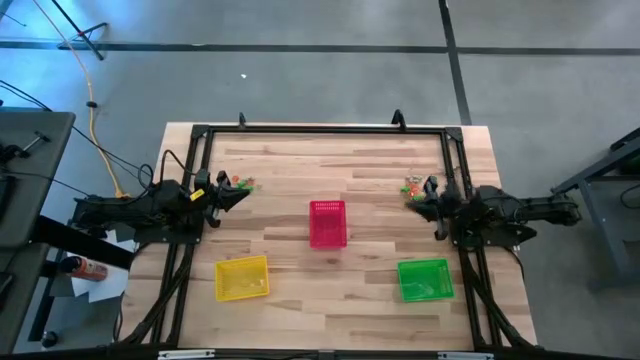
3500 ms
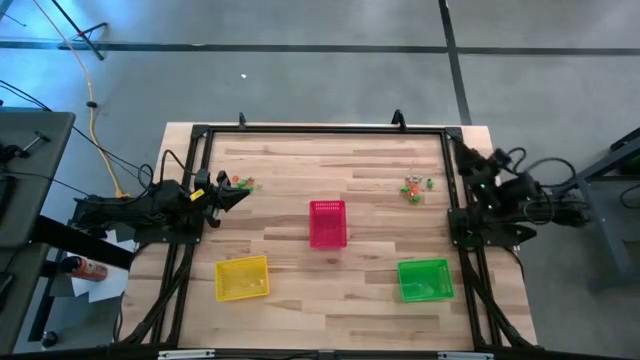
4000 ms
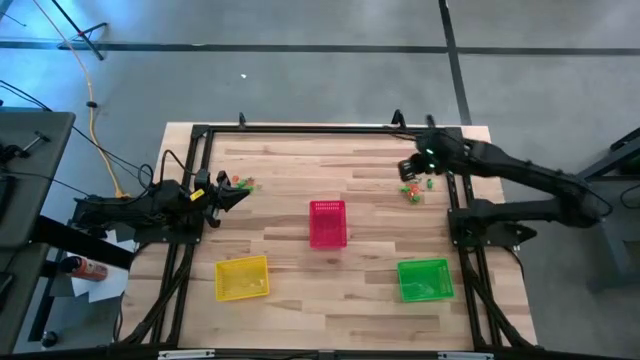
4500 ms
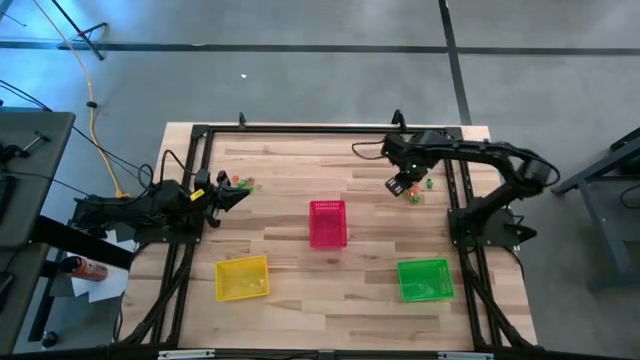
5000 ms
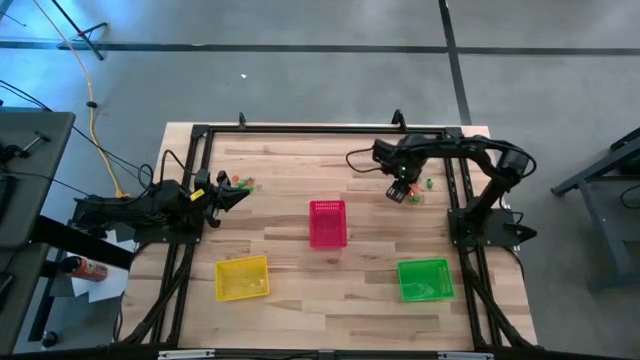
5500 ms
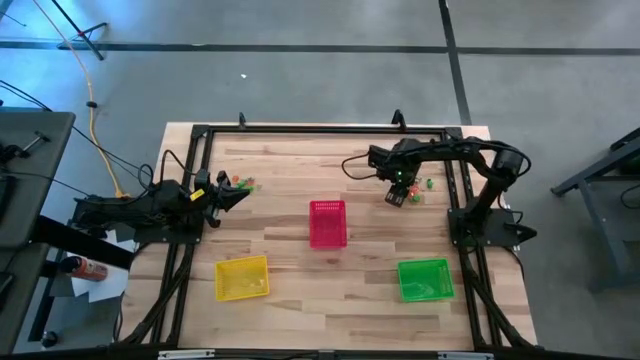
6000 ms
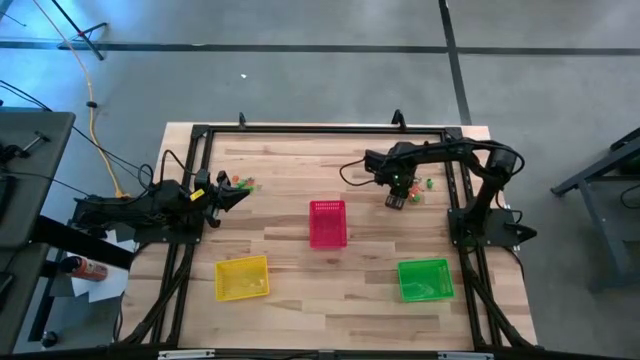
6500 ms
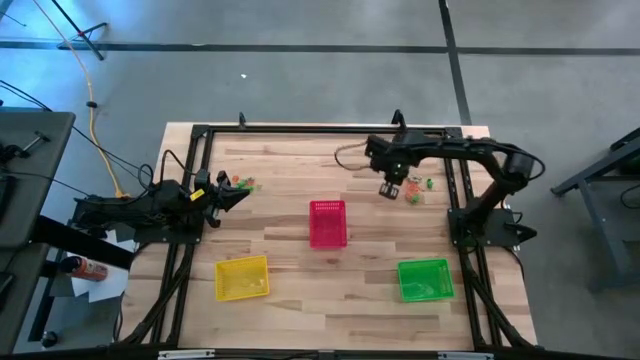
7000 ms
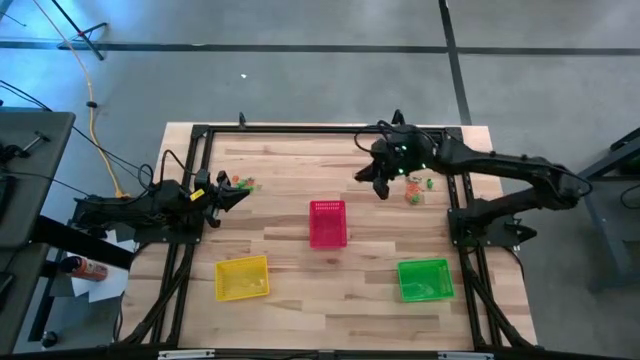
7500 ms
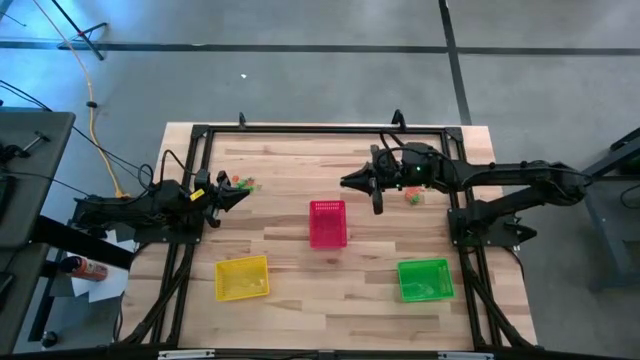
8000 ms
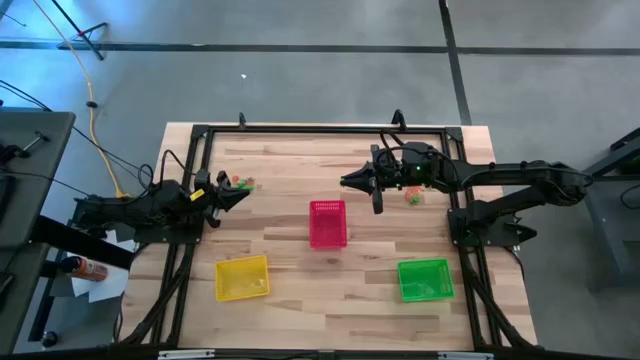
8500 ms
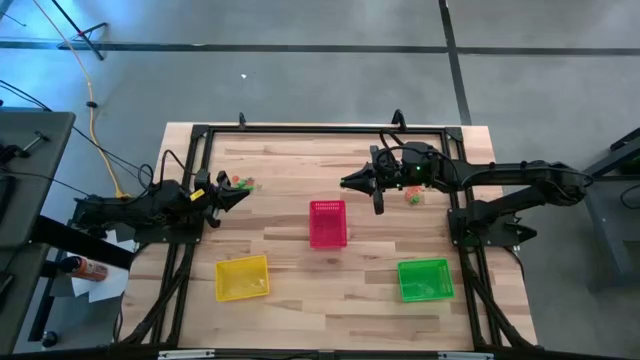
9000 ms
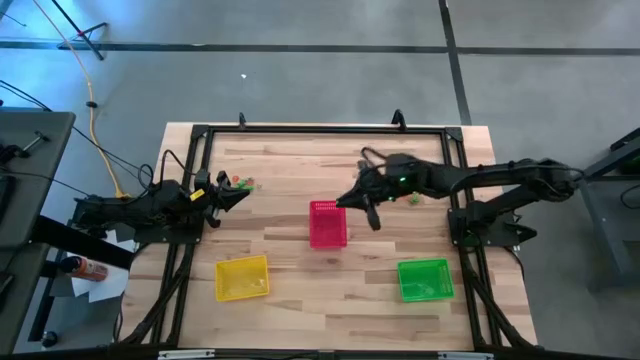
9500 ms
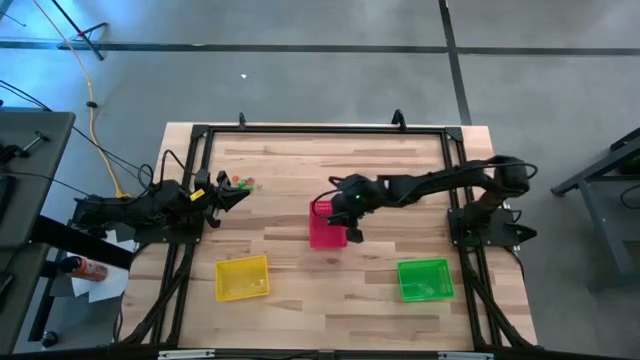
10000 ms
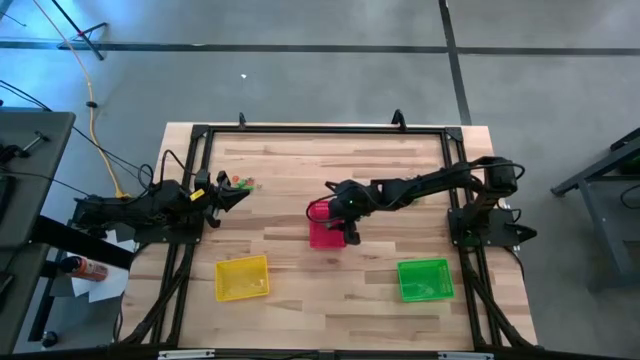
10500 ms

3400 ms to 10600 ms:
Task: Sort Halloween decoration
Put the green skeleton toy into the red bin

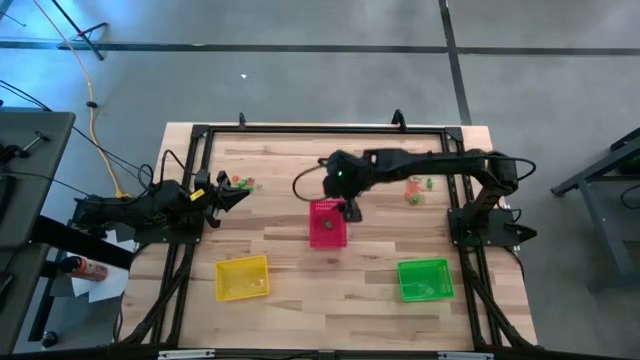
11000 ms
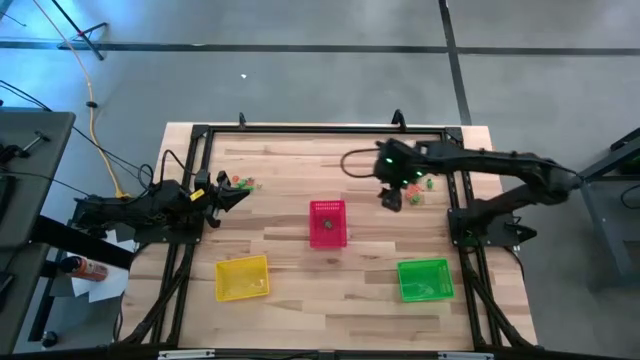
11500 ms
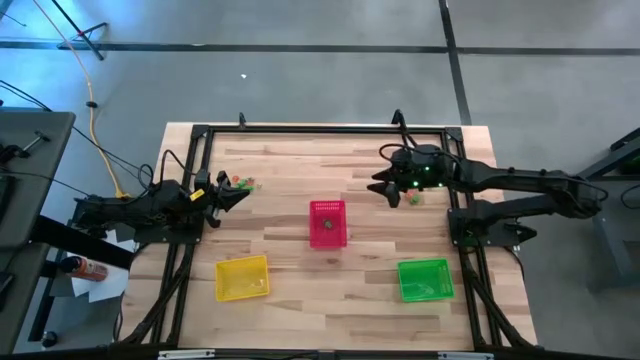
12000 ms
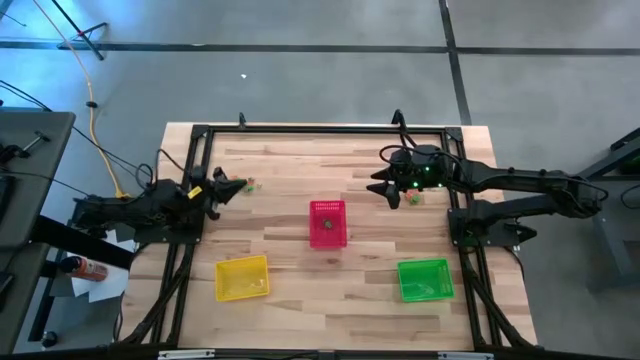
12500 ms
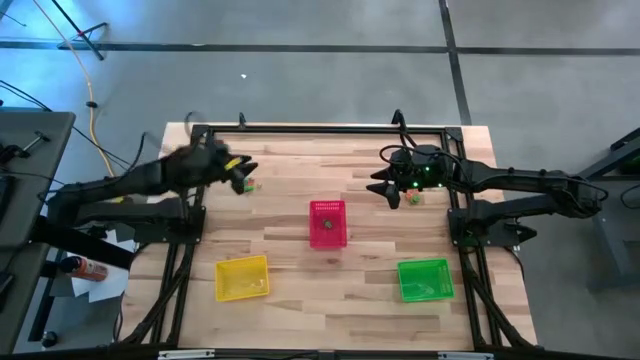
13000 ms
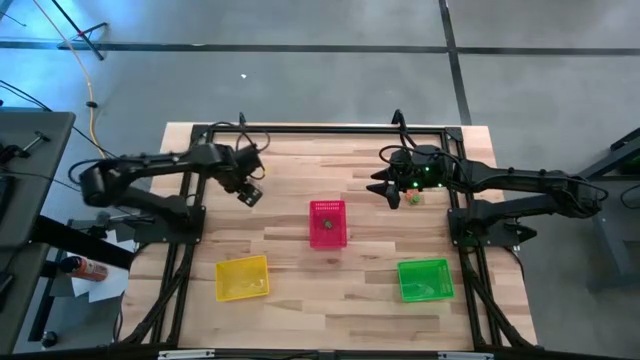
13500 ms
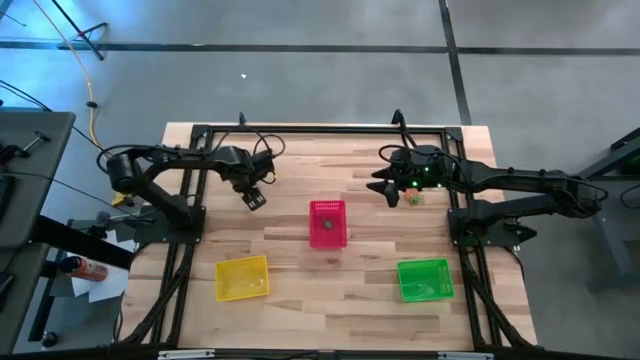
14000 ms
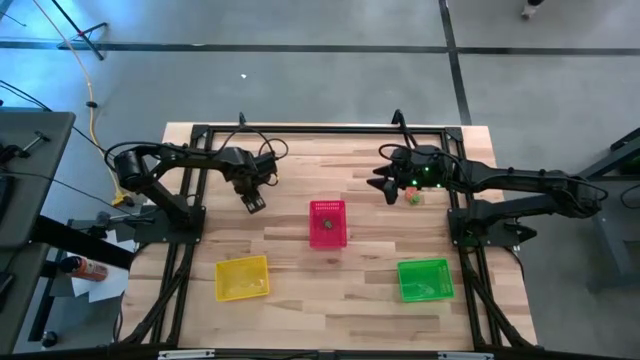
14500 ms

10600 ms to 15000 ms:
Put the green skeleton toy into the red bin

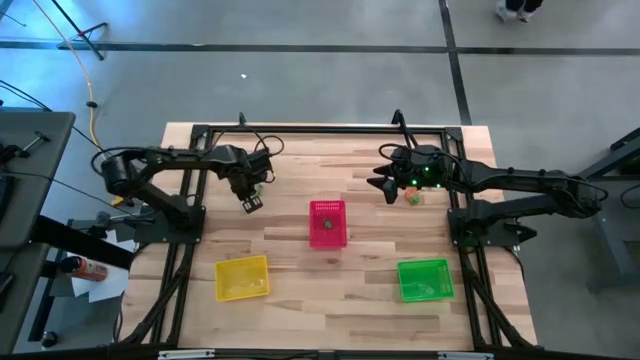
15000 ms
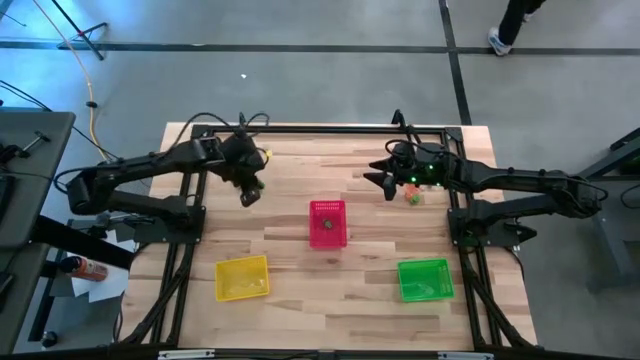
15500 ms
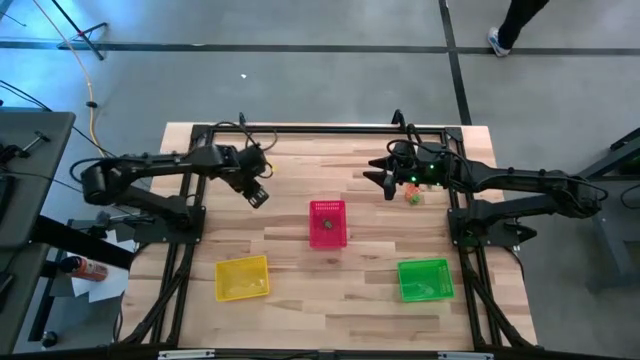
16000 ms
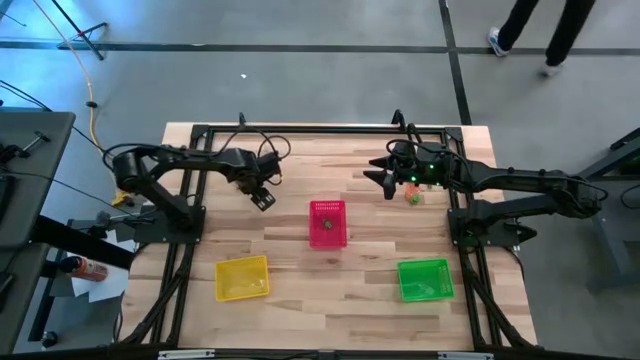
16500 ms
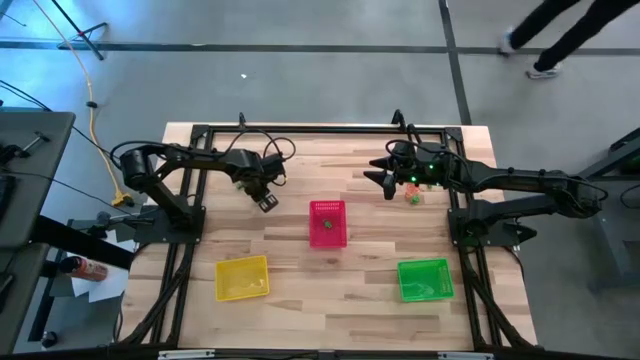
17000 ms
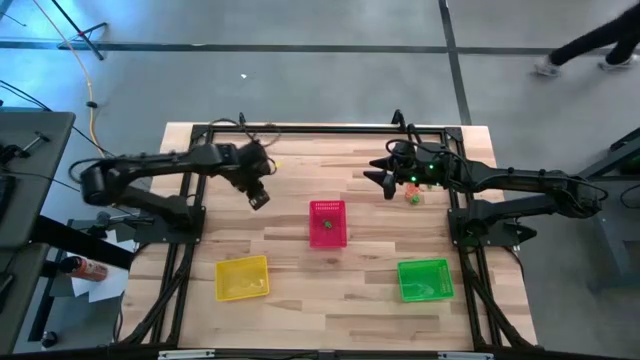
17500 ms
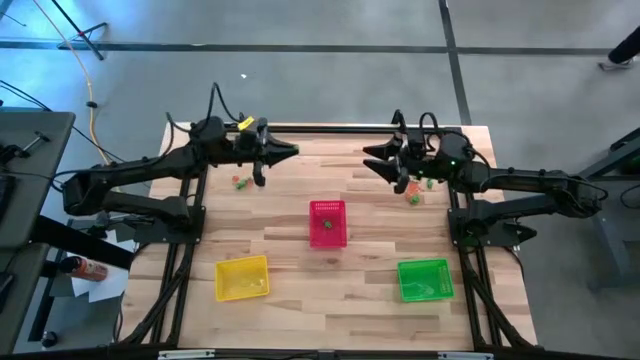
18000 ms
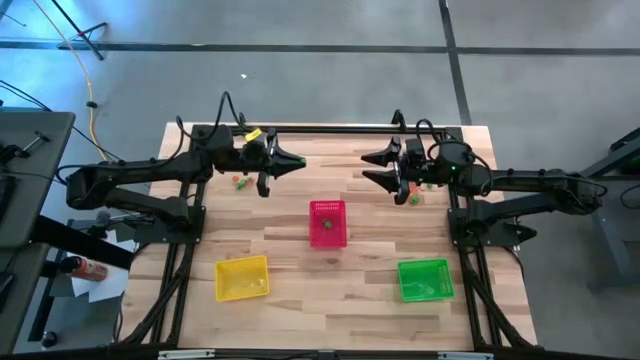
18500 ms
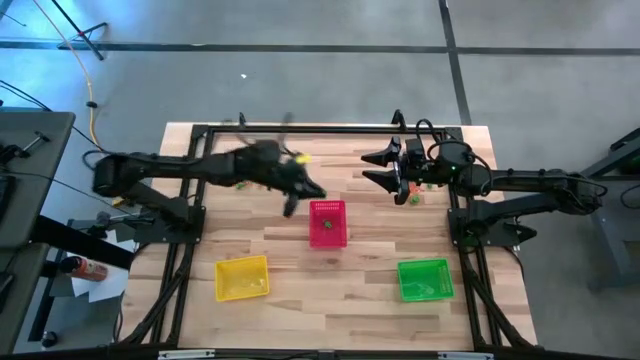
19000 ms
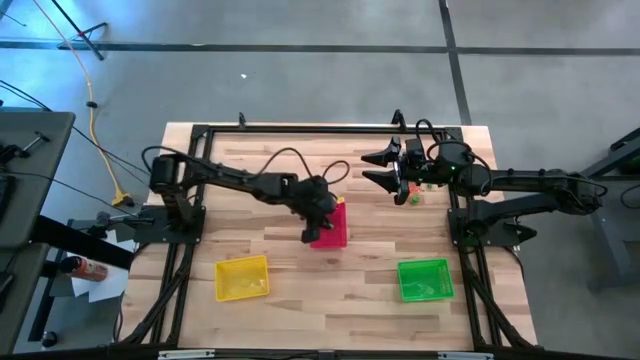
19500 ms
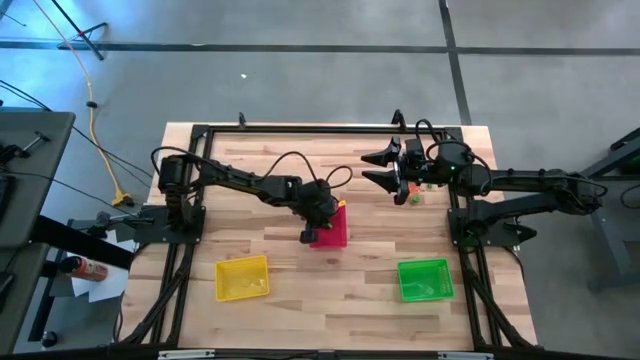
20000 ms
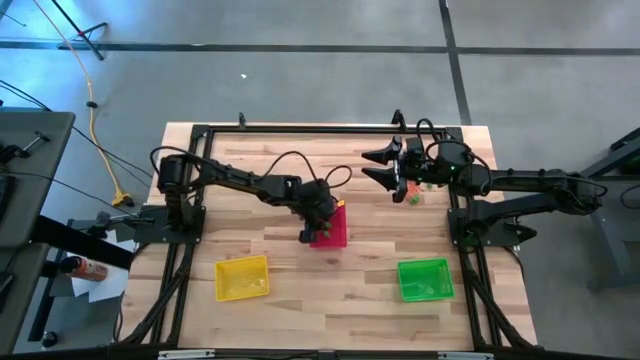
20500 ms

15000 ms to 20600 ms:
Put the green skeleton toy into the red bin

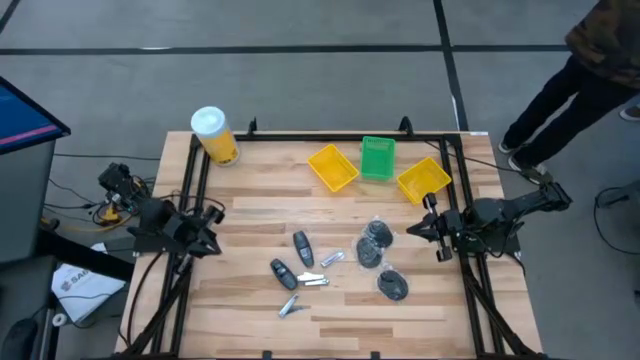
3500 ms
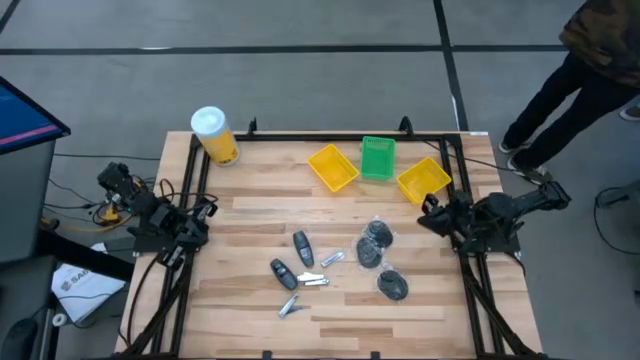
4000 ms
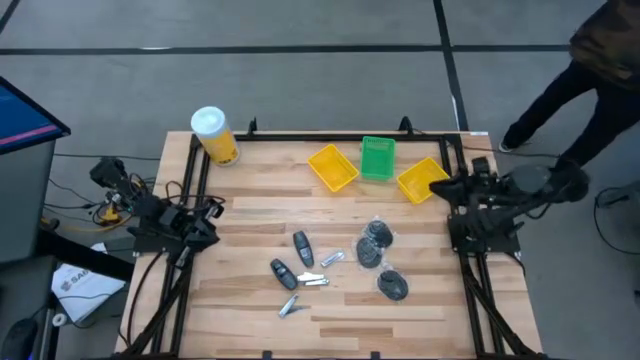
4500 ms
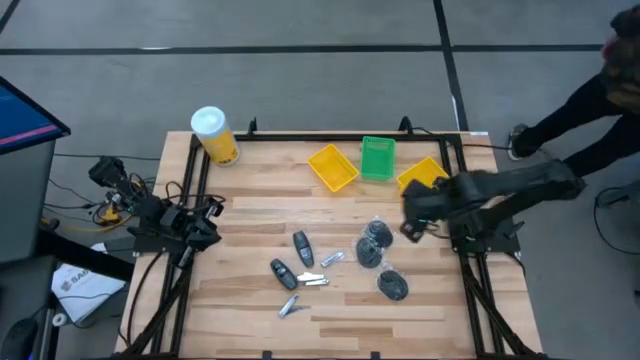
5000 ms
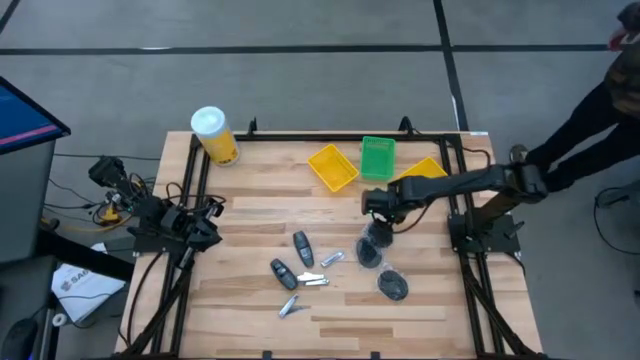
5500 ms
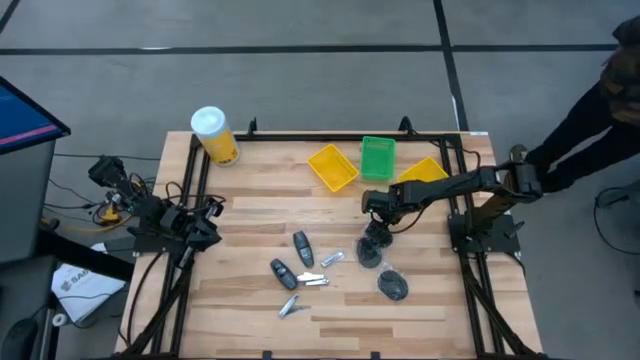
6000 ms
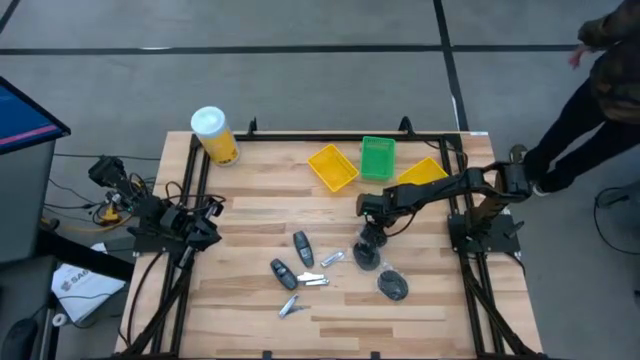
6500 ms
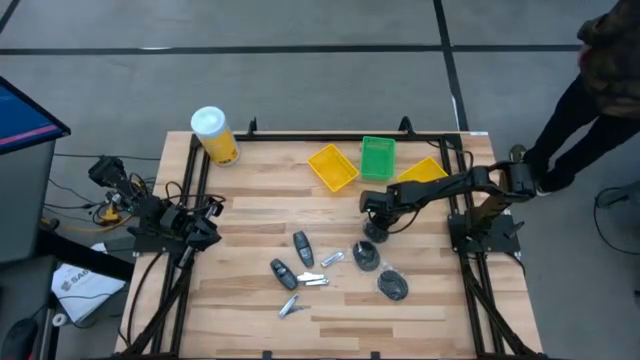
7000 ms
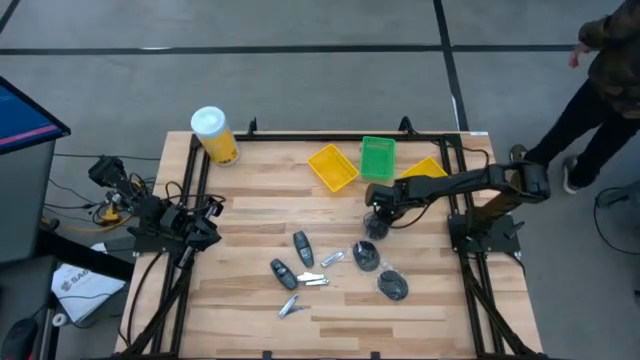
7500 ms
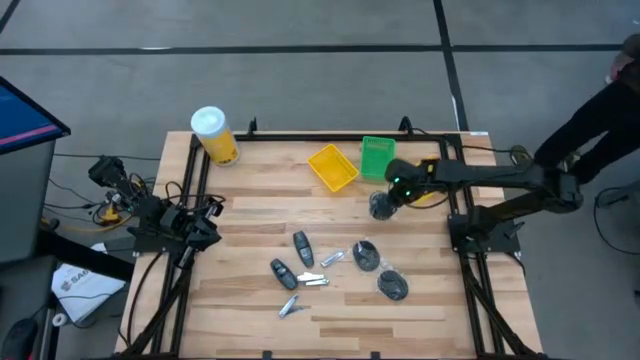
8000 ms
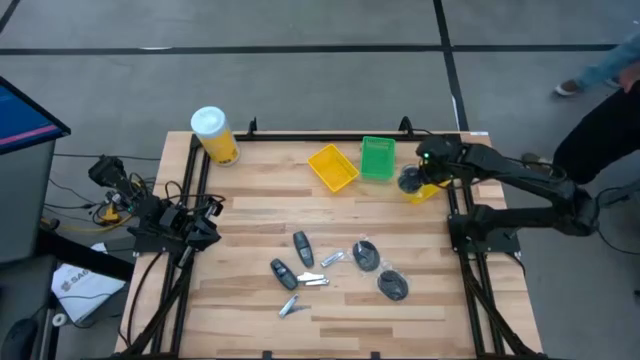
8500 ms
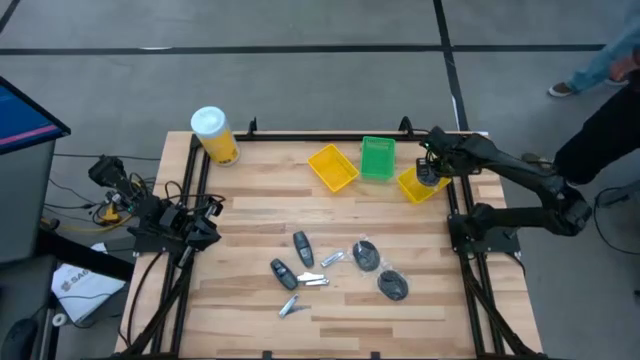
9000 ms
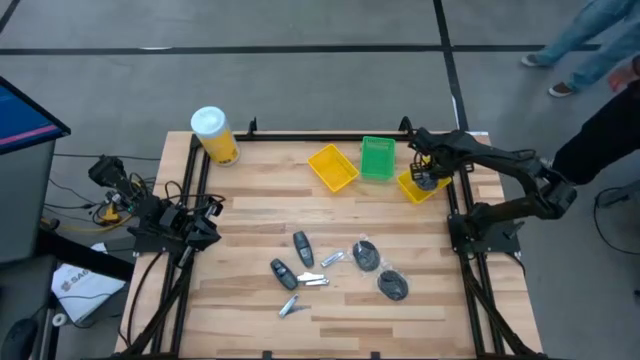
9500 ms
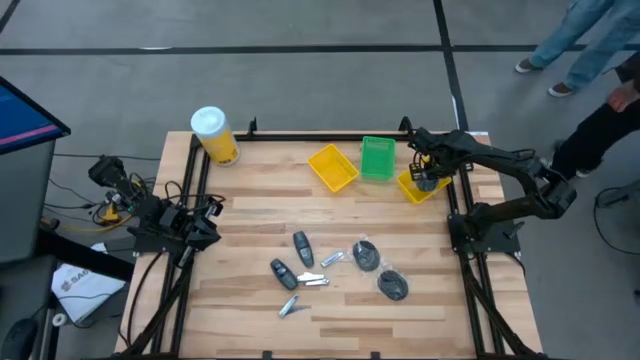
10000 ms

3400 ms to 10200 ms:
Task: Pick & Place Travel size toiletries
Put the black hairbrush into the right yellow basket
